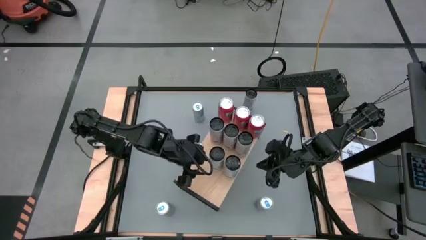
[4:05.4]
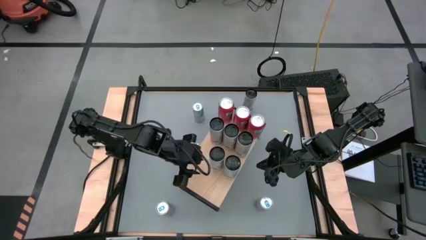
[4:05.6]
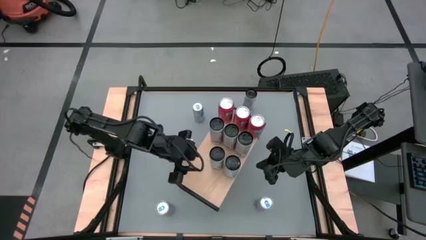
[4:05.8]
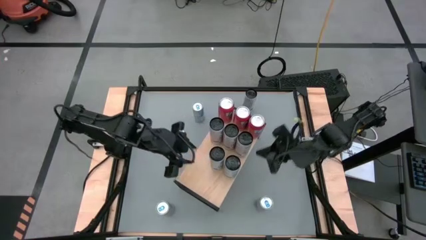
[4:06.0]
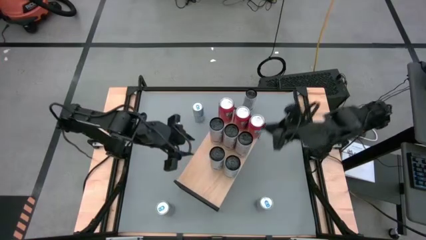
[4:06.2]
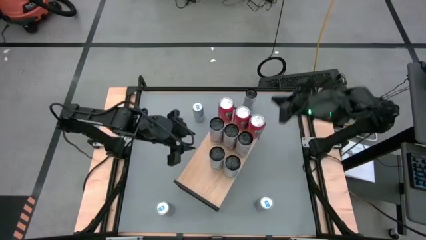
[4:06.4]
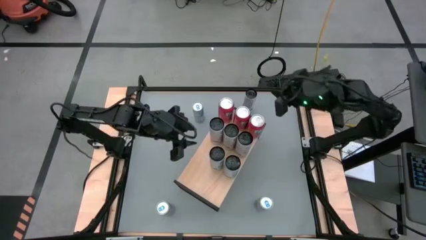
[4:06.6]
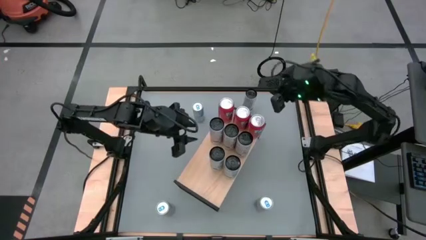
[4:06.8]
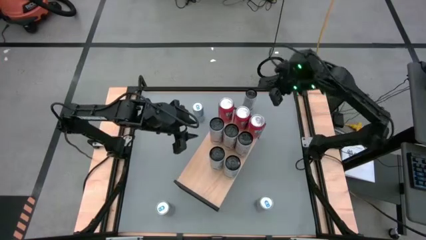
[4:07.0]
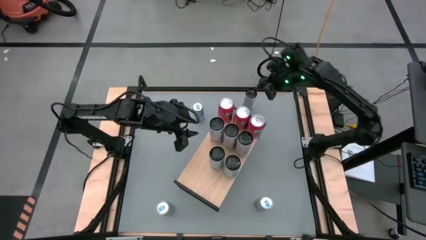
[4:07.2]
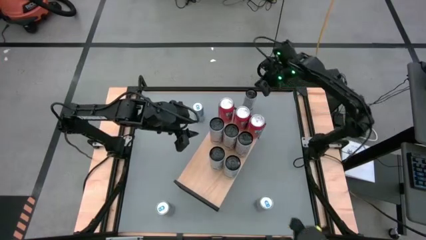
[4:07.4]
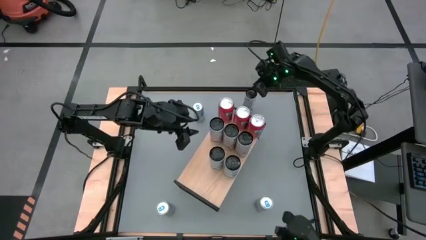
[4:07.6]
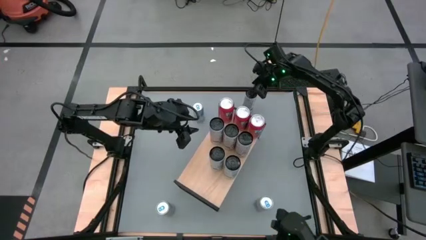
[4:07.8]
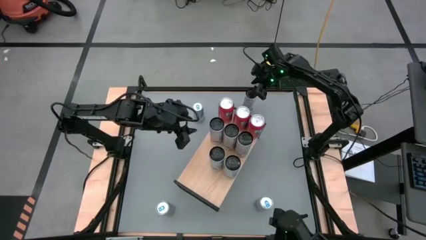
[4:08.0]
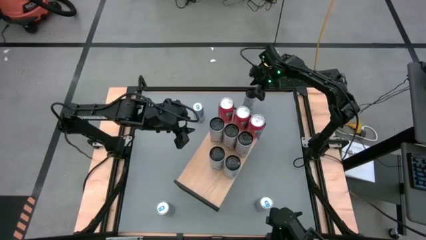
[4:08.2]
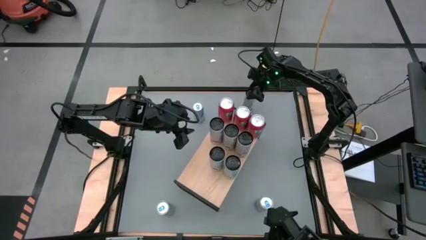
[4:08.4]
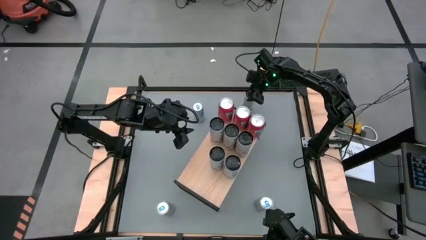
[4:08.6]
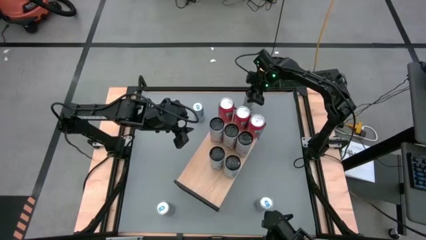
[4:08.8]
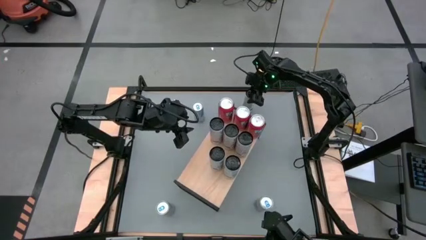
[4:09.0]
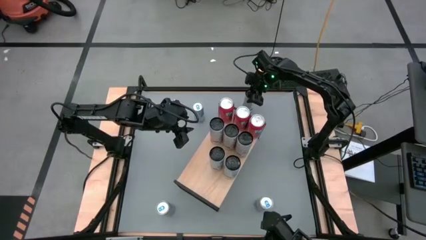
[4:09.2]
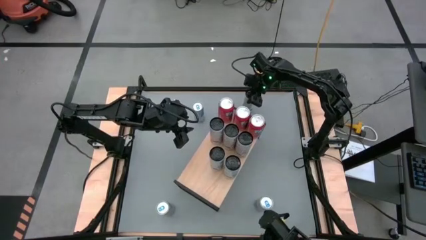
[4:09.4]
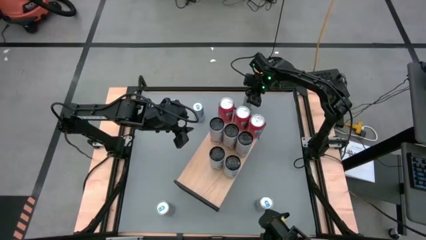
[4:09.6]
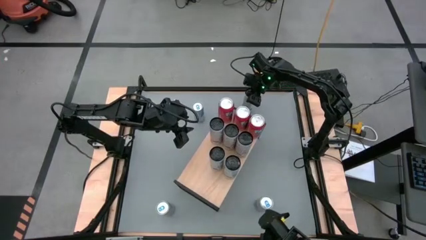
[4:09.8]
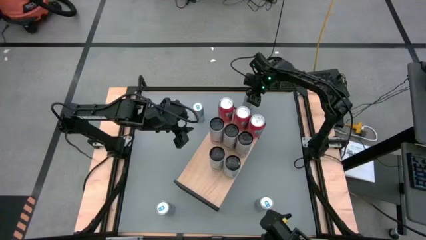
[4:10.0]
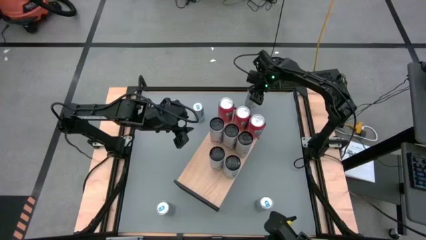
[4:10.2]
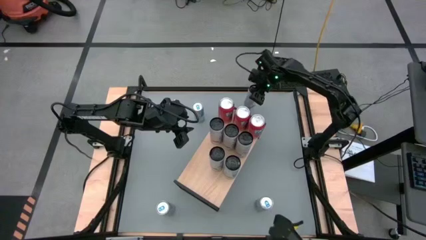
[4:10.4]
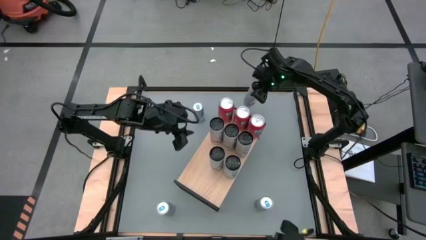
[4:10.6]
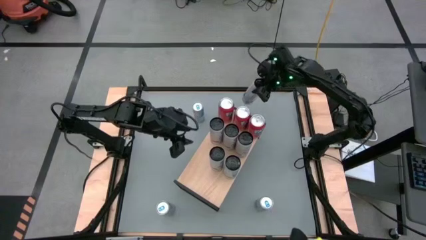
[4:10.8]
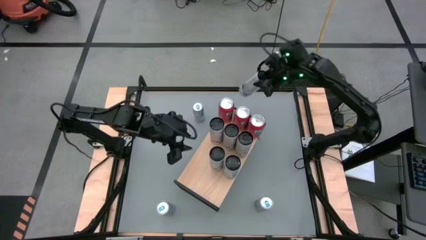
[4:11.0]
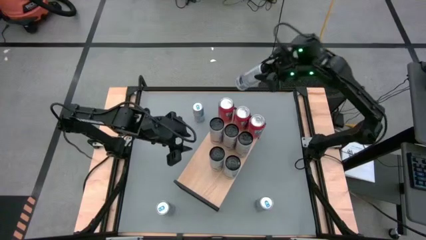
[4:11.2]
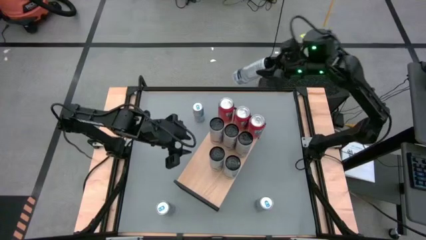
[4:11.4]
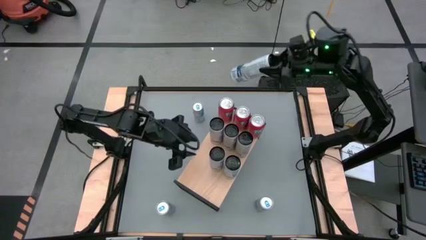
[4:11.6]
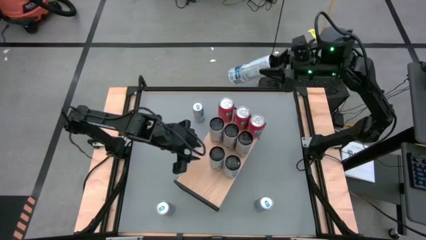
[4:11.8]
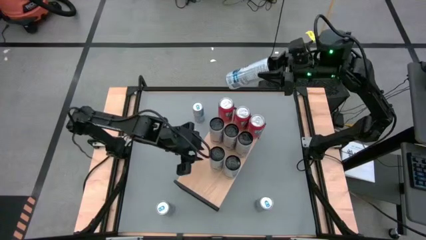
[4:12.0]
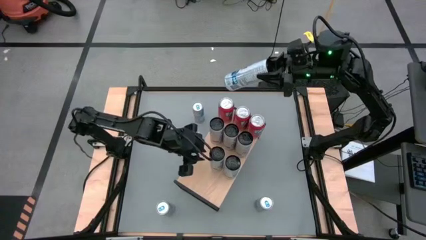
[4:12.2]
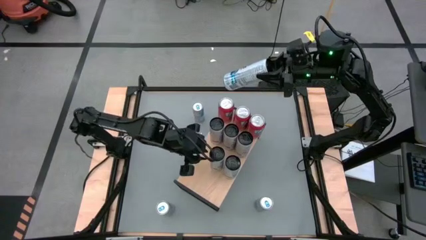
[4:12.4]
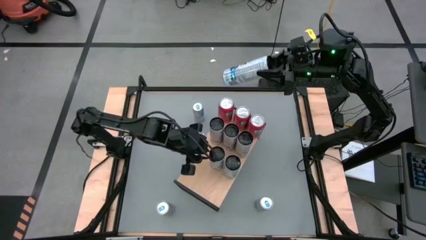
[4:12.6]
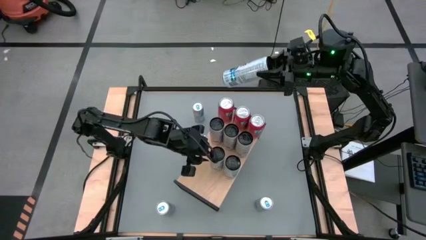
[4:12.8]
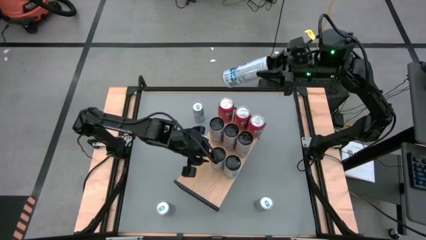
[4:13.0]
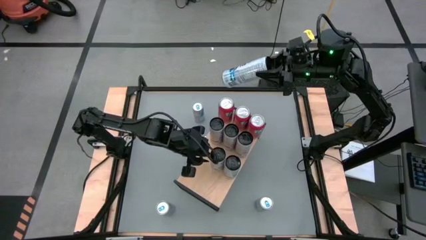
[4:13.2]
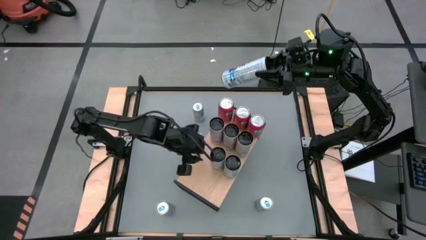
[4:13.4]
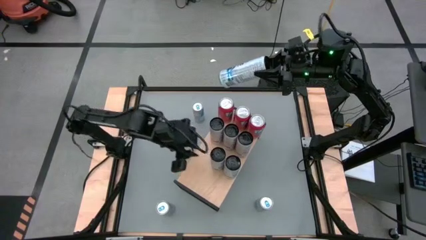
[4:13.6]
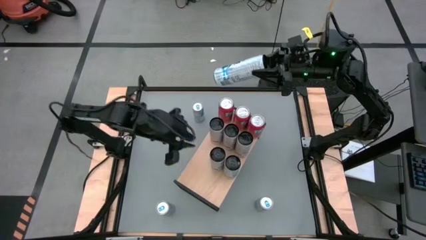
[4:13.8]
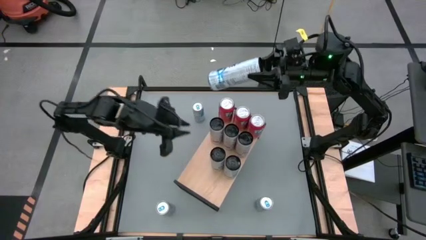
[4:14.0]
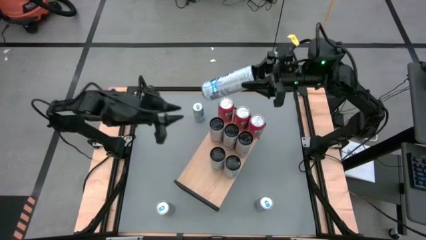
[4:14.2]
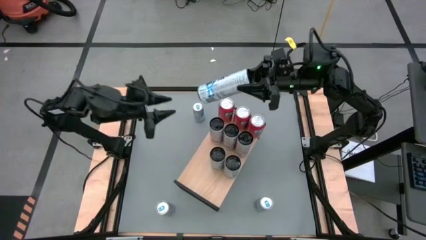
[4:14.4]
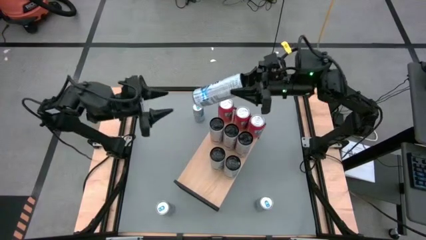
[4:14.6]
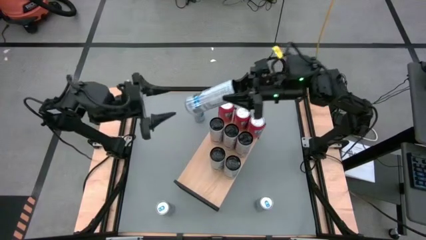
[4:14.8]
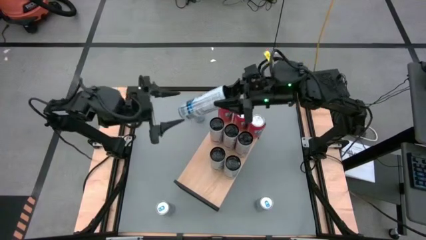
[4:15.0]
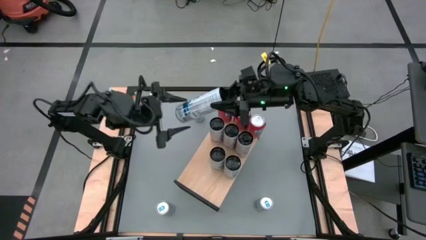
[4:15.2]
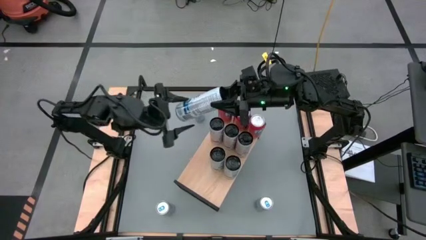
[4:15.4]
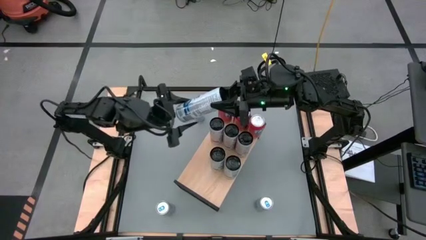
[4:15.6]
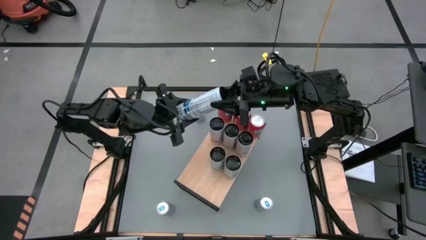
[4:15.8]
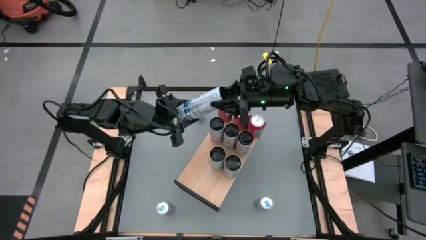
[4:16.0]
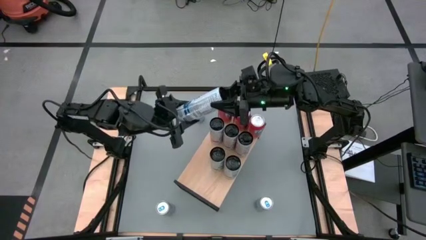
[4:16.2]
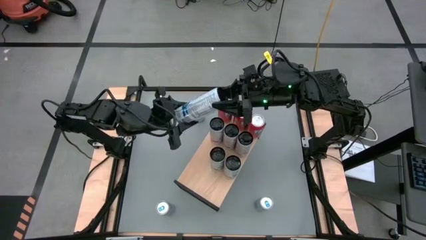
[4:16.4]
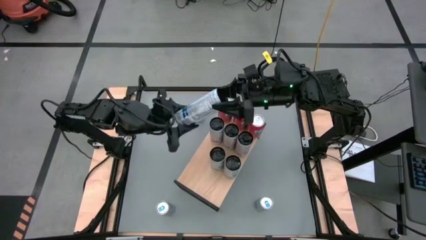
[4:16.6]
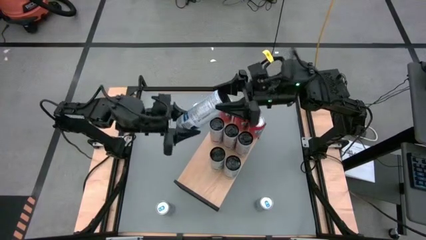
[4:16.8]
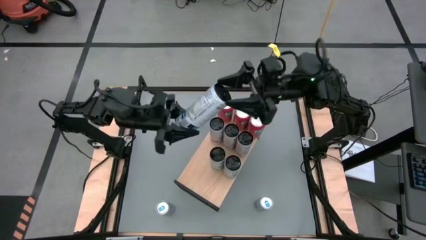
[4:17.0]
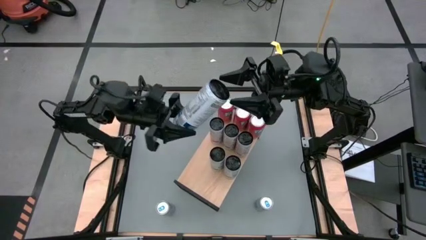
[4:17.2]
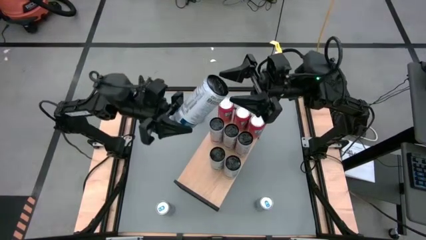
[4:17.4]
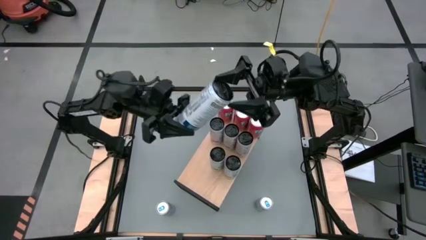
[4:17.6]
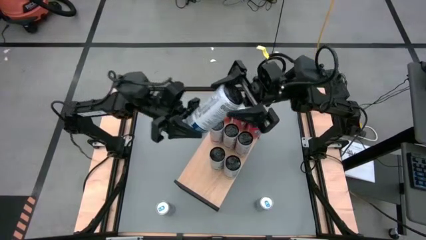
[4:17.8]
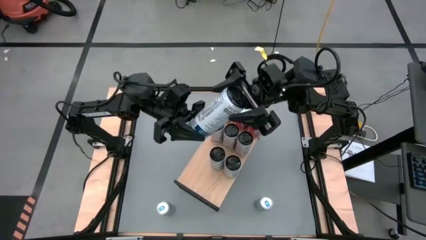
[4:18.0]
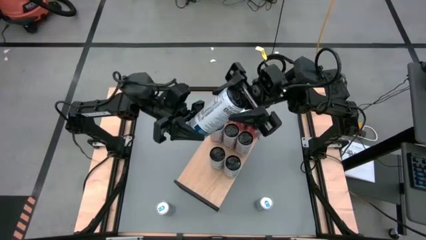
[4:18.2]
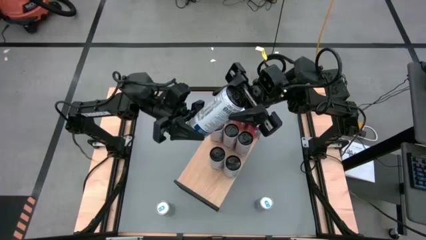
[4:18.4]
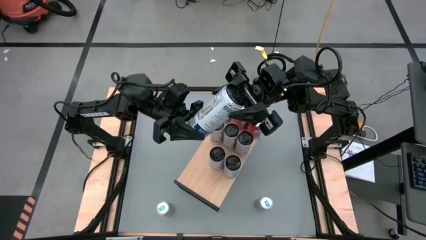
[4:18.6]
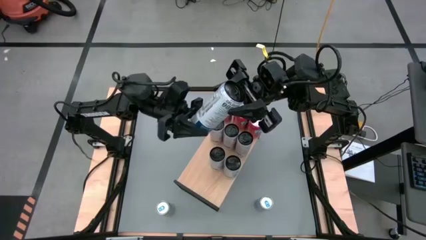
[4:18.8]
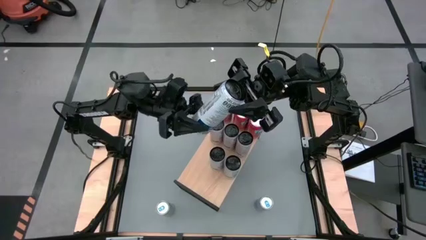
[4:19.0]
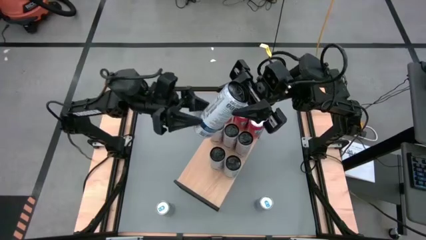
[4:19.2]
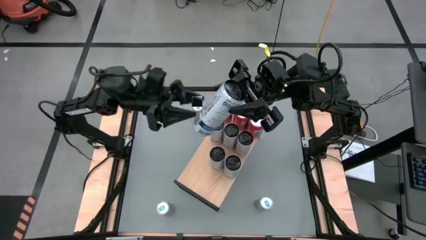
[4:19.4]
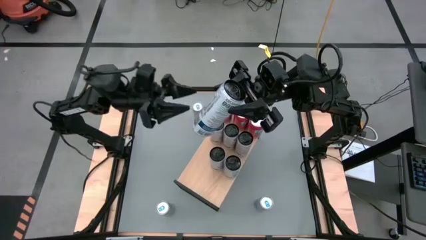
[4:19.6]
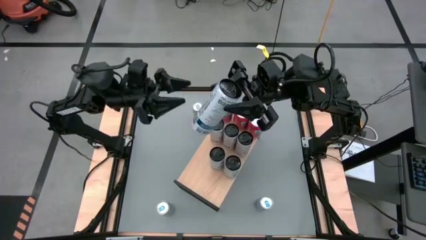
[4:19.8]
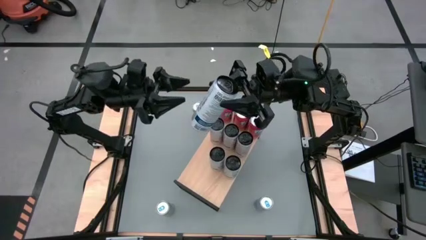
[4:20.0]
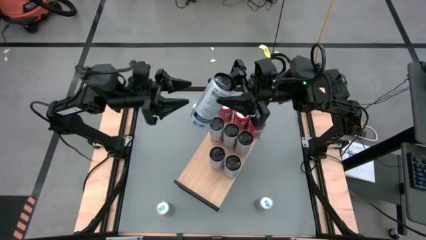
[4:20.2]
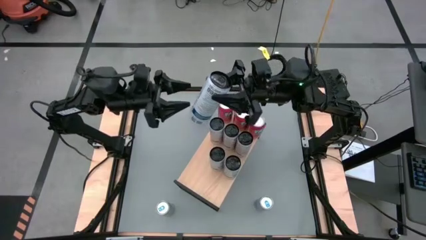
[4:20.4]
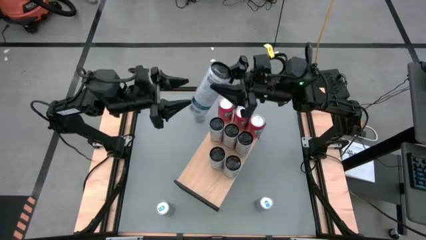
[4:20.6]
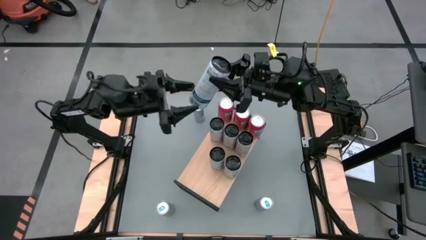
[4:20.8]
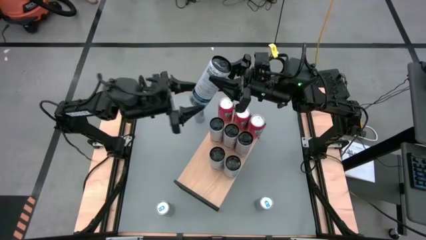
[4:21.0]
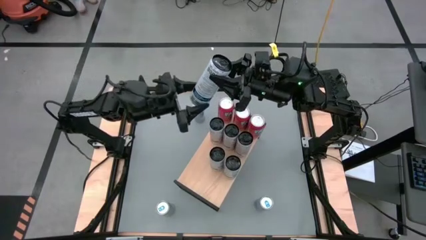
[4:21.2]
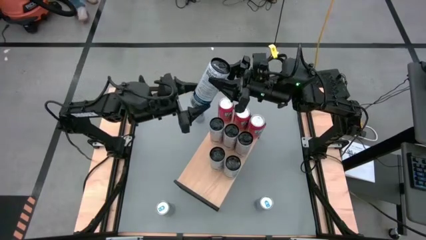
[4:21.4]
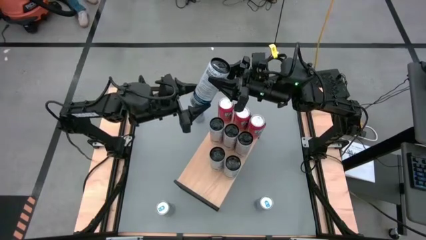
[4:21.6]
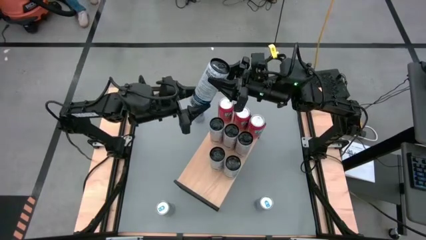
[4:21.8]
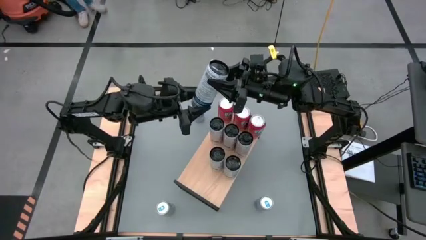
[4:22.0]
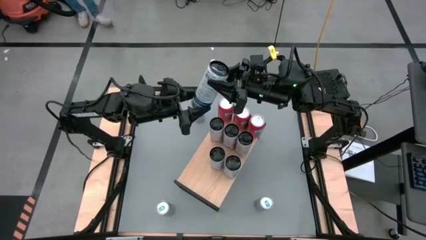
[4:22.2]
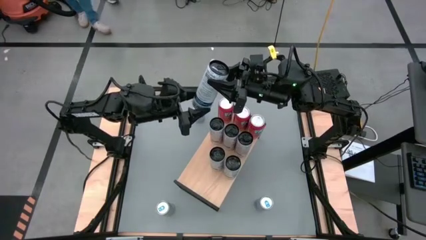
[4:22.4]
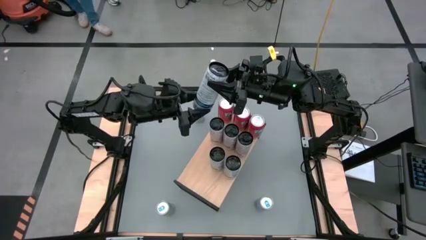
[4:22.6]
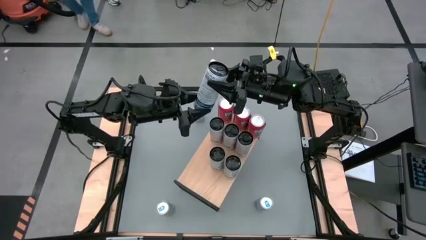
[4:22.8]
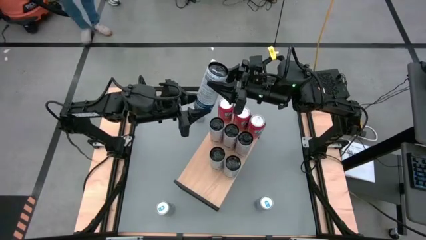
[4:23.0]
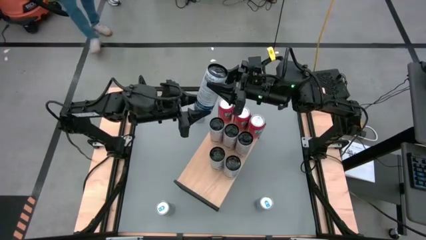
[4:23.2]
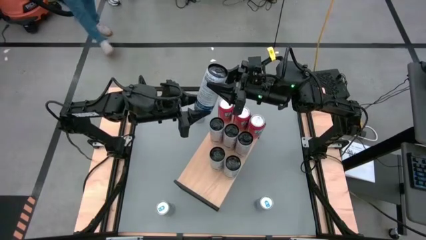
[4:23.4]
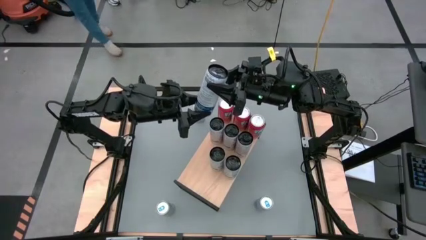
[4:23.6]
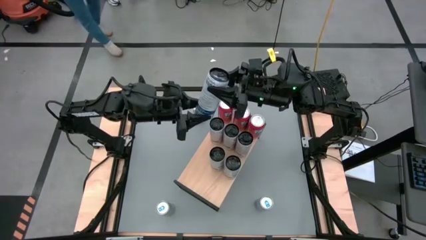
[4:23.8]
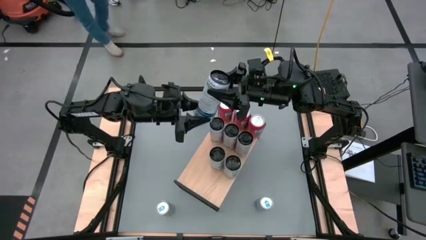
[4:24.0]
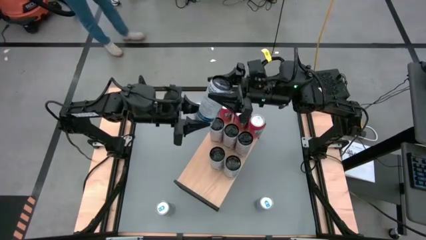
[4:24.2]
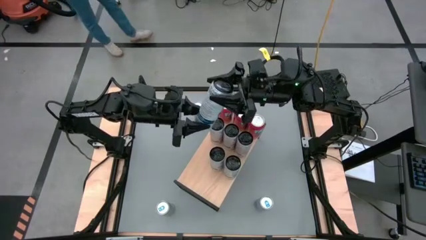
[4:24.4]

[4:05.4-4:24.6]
Task: Place canned beverage on shelf
Put the white blue soda can on the shelf aligned with the other white blue soda cans
